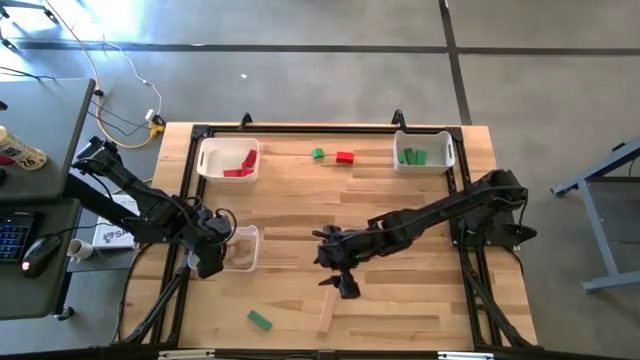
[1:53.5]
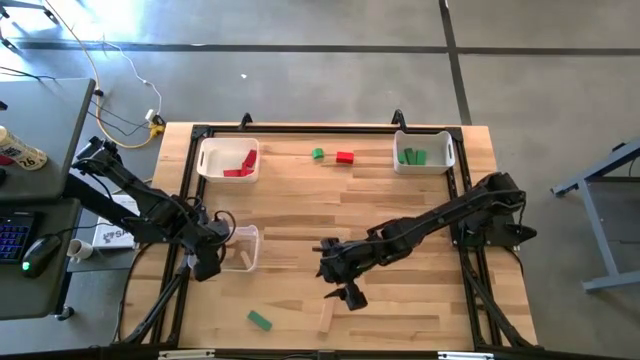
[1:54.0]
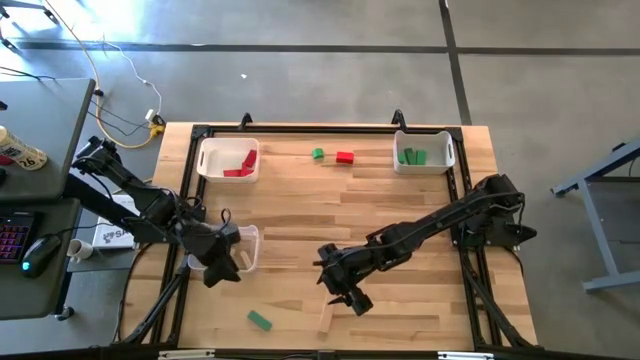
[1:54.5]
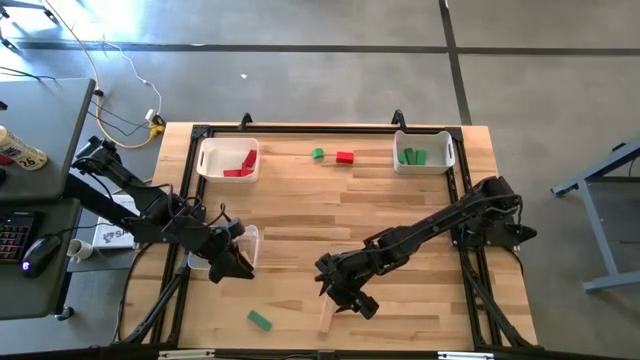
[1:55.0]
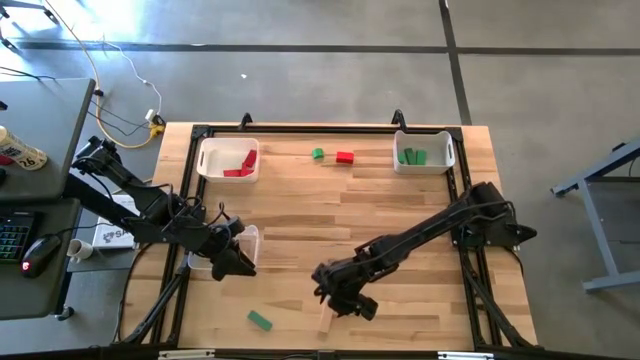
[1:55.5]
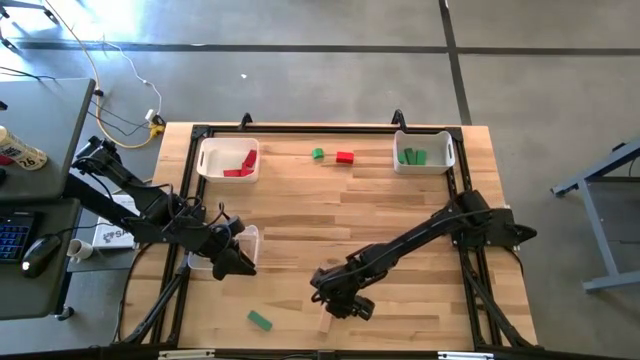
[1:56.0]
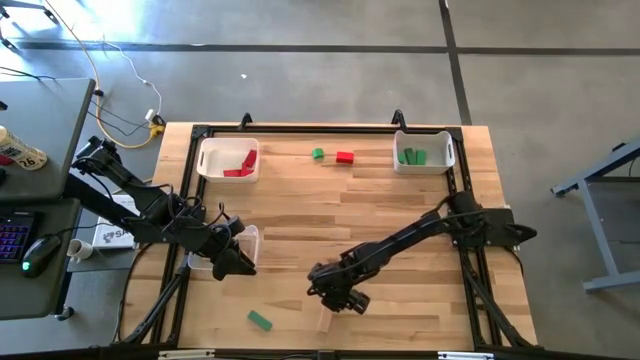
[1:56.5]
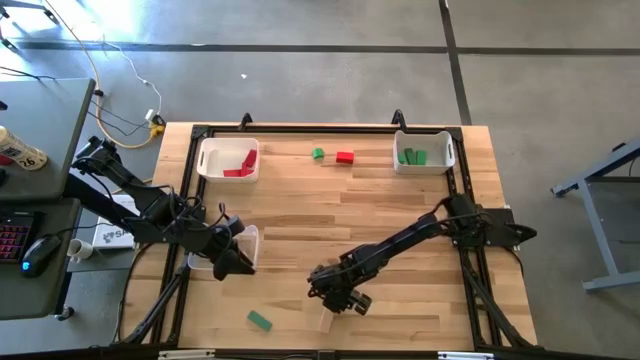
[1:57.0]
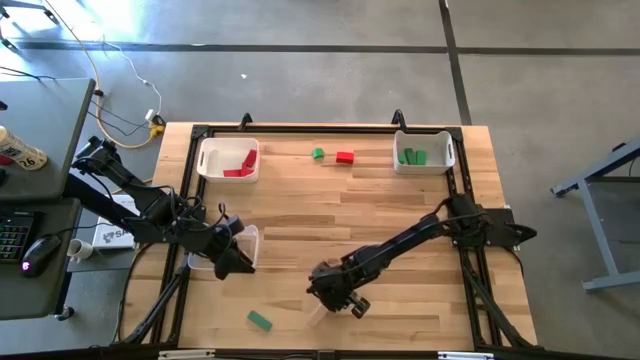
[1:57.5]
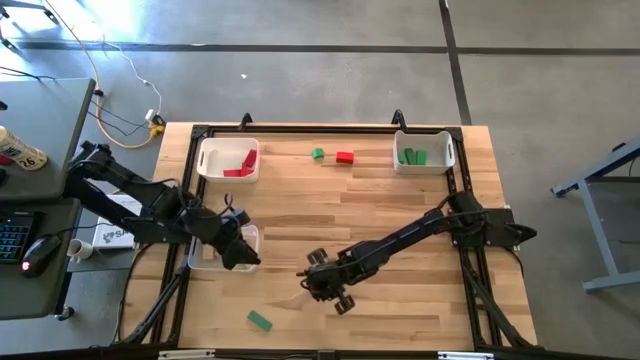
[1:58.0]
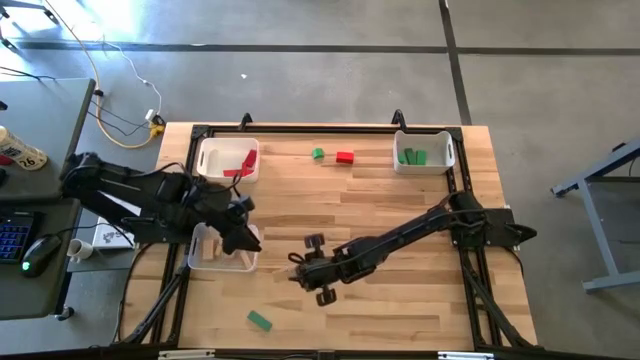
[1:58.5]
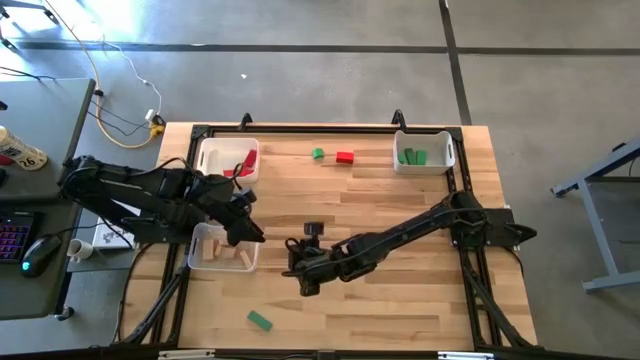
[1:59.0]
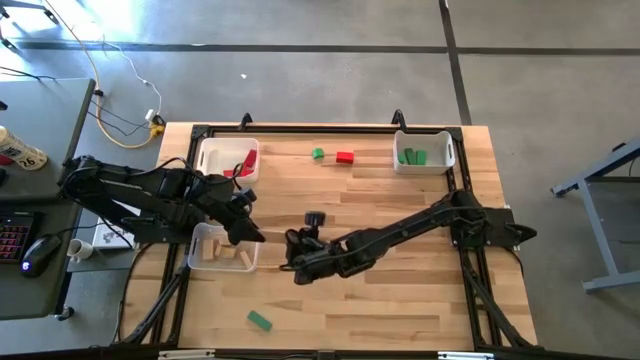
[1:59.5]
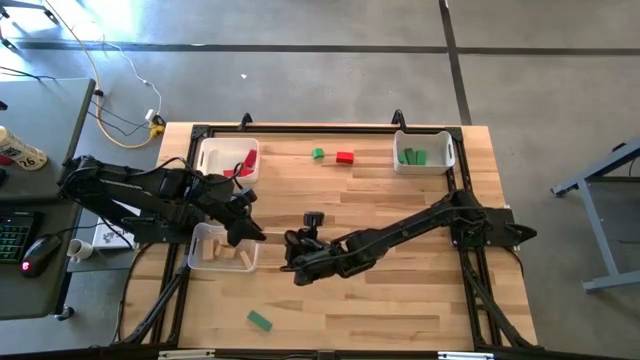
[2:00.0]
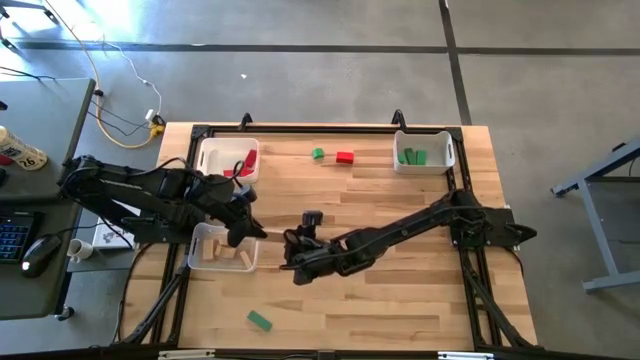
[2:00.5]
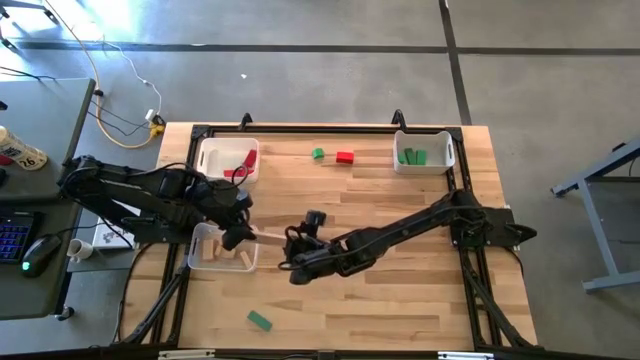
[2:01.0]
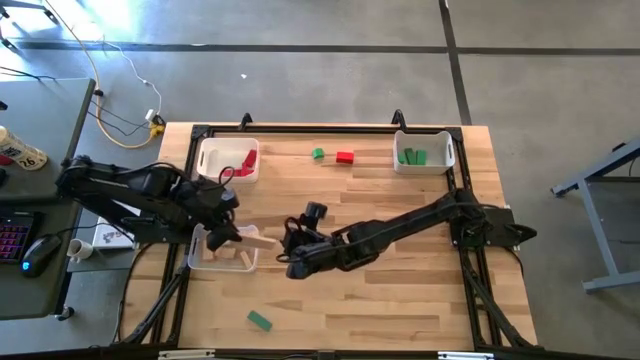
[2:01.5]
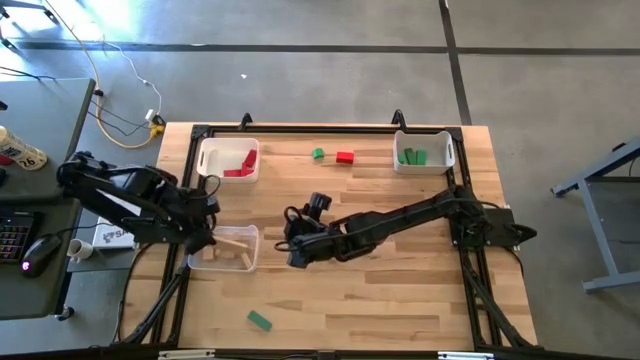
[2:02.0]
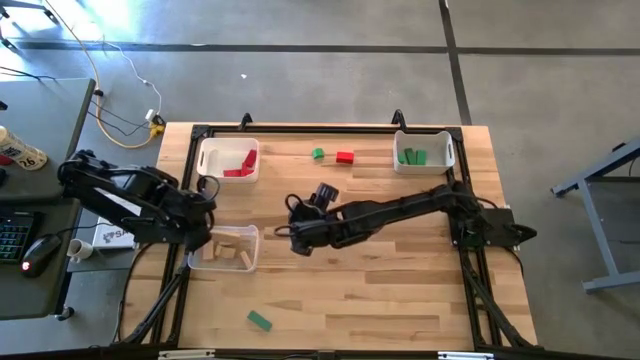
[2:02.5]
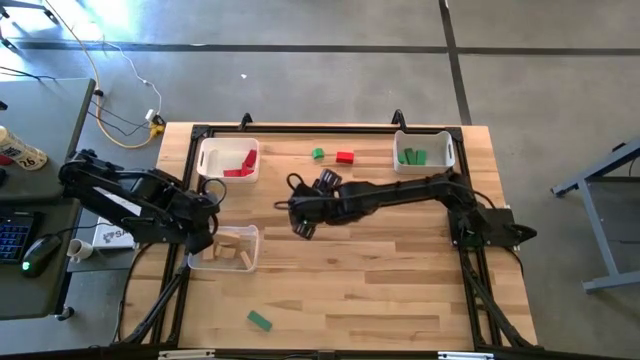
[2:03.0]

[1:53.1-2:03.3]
Task: Sort & place blocks by color
Put the cream rectangle into the transparent bin

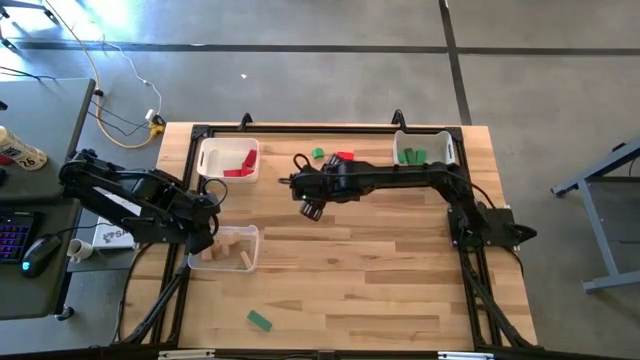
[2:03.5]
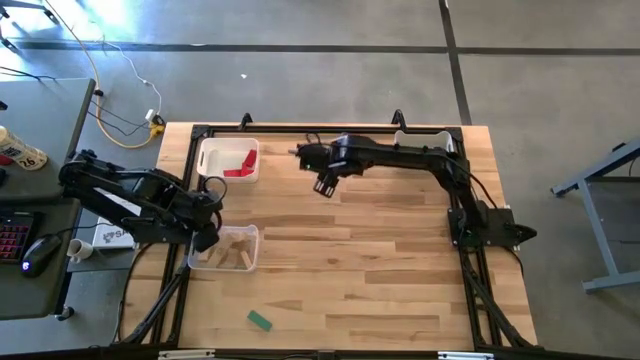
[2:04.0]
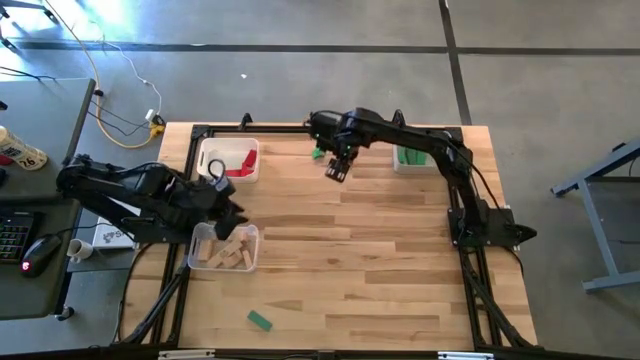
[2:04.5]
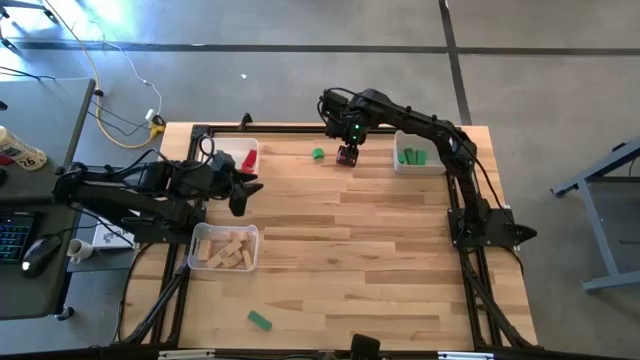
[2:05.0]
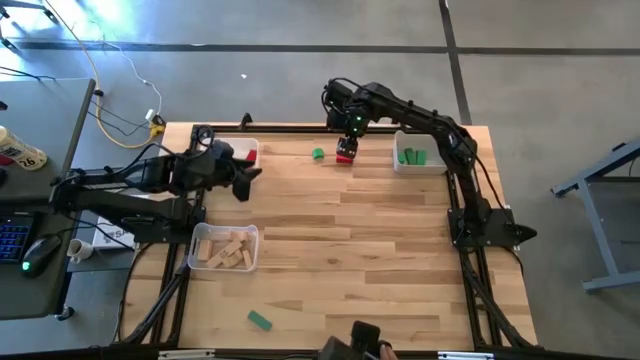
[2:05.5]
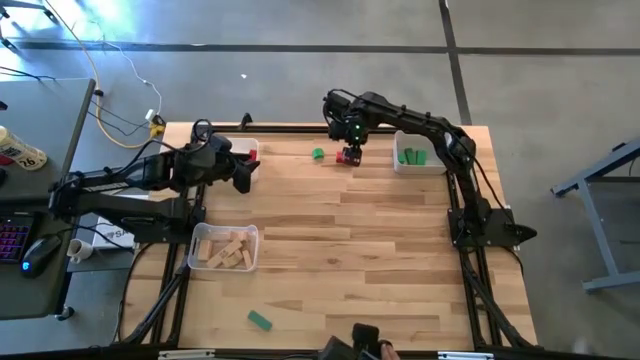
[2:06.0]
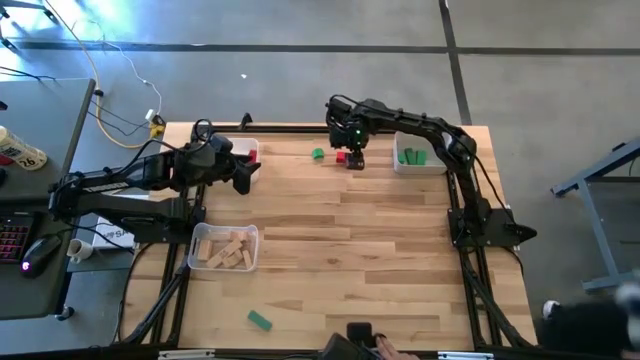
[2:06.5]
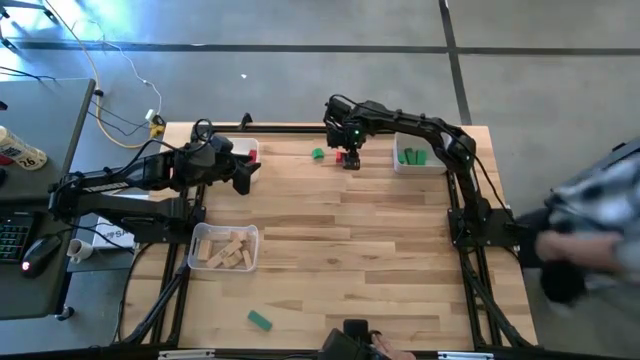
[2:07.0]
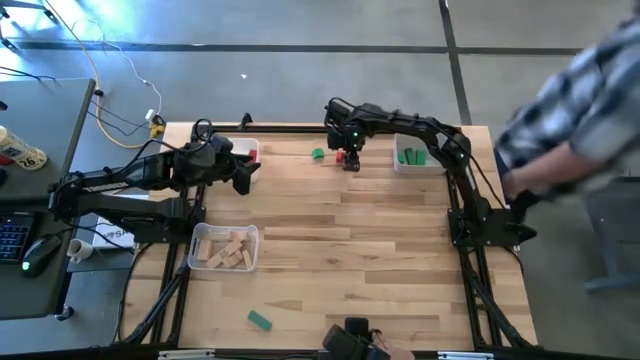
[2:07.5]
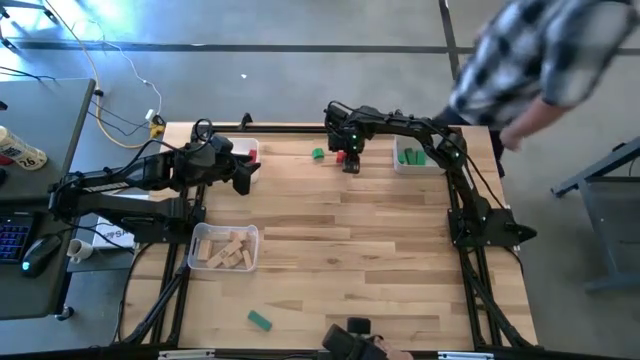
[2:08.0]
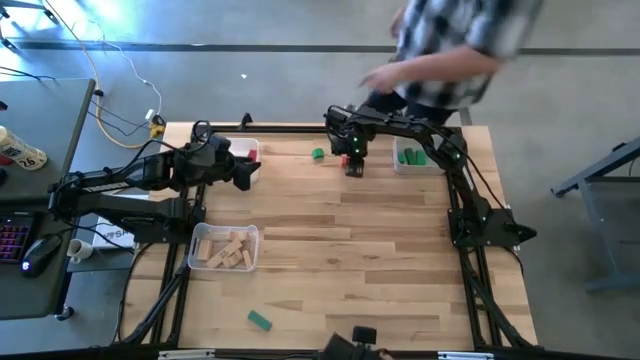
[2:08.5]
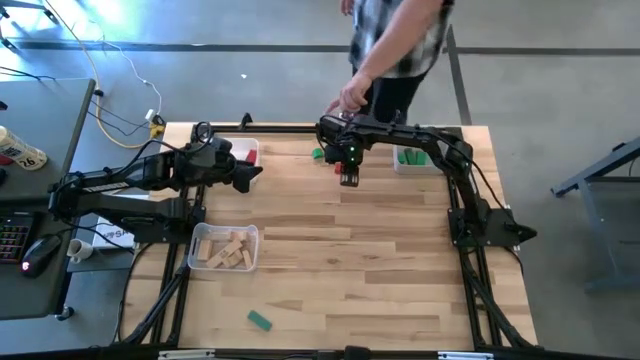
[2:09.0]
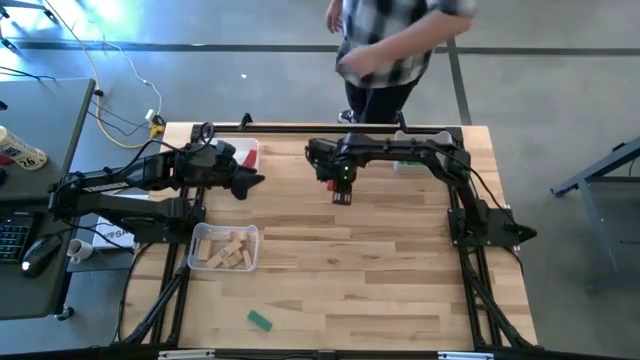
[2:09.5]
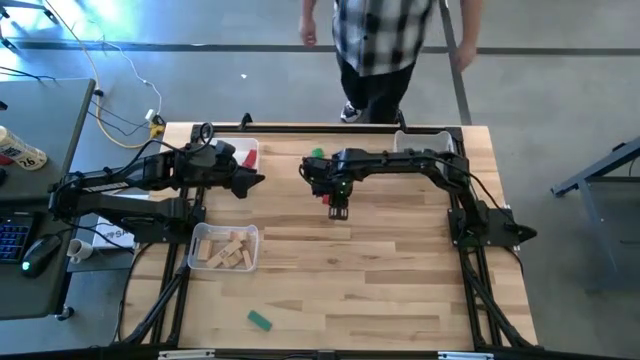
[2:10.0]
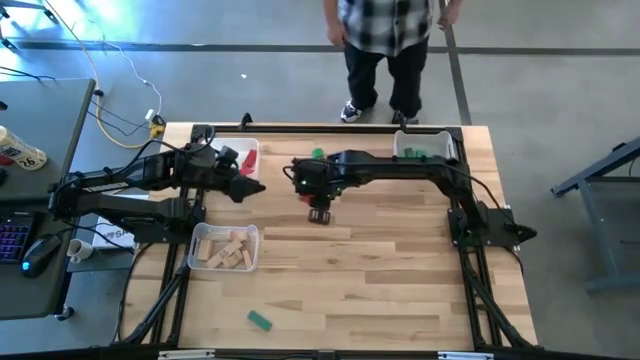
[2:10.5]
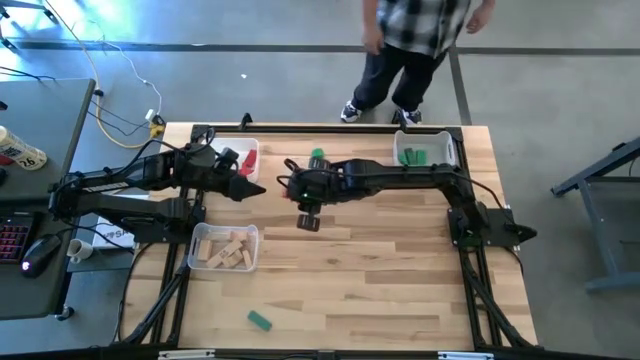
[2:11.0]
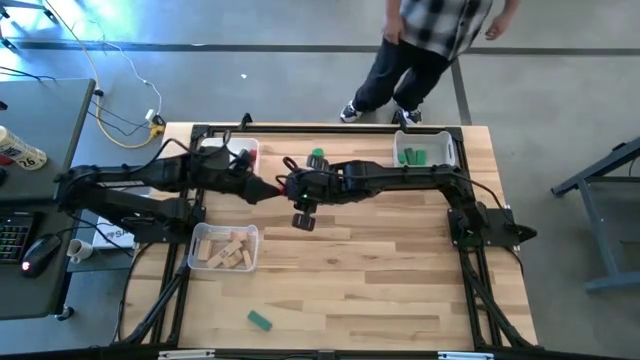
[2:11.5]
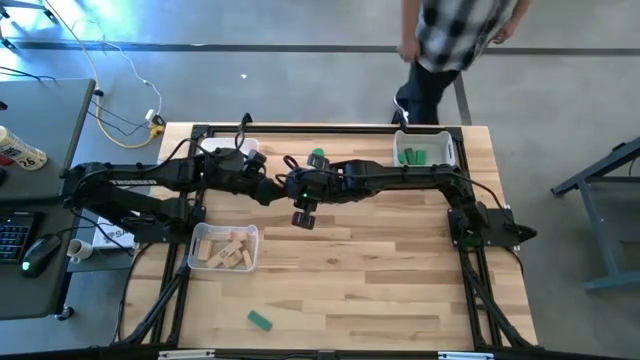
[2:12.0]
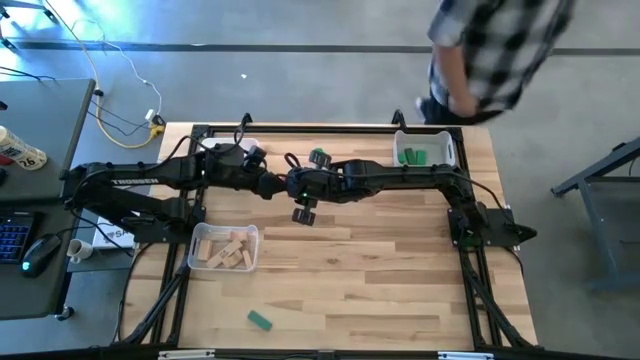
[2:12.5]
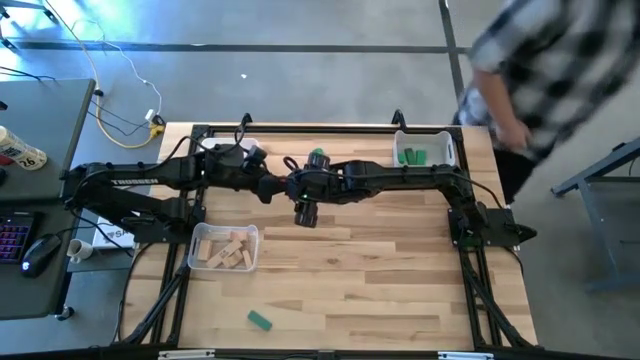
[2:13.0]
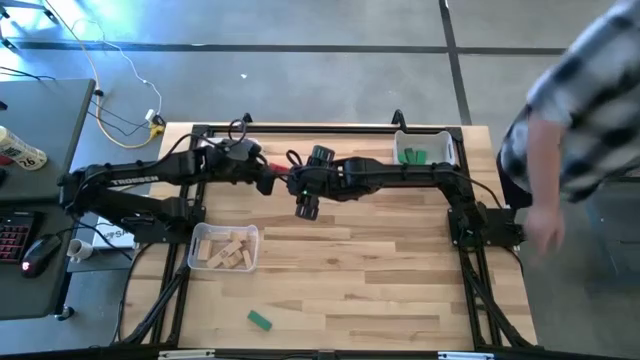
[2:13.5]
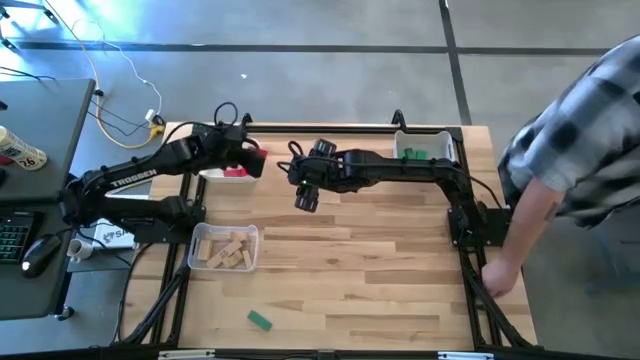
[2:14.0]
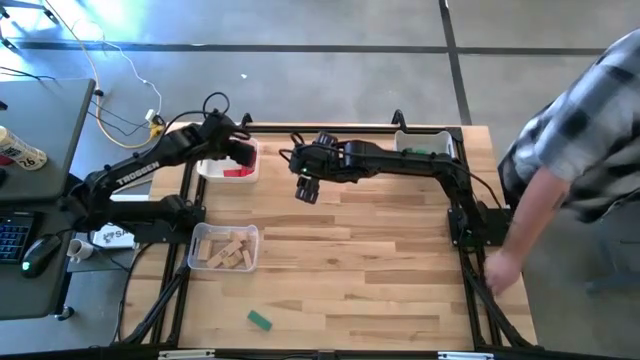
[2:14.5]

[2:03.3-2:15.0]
Put the red rectangle into the left white bin
